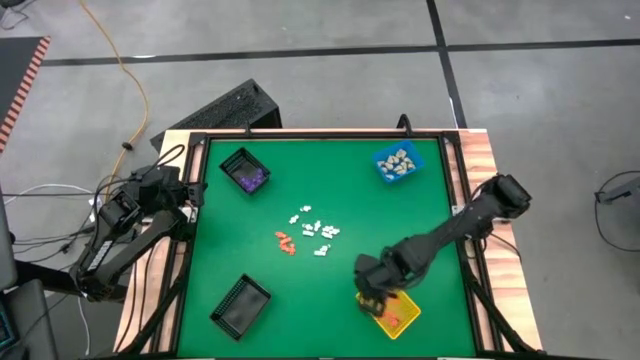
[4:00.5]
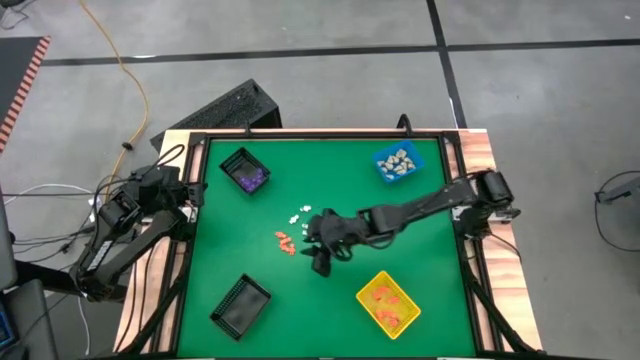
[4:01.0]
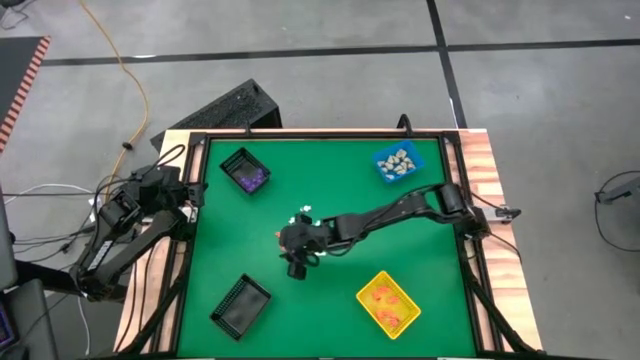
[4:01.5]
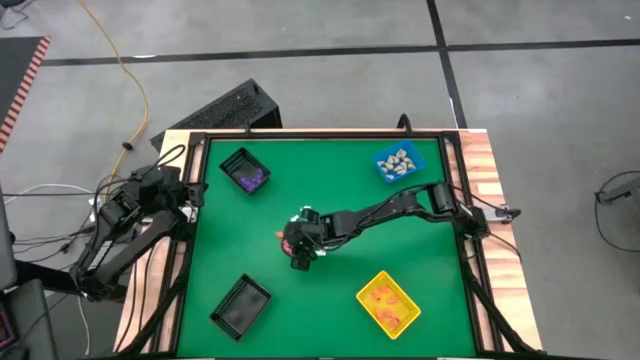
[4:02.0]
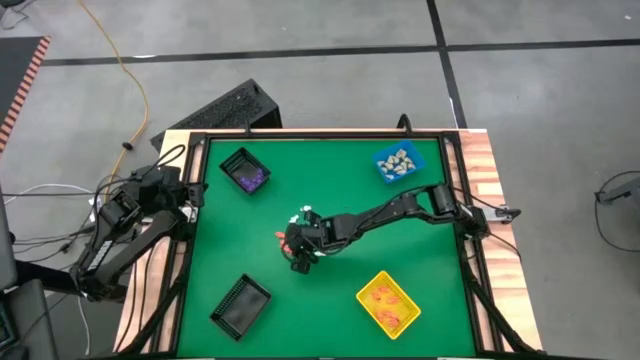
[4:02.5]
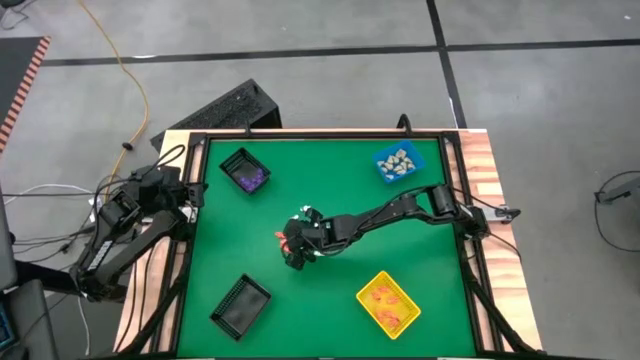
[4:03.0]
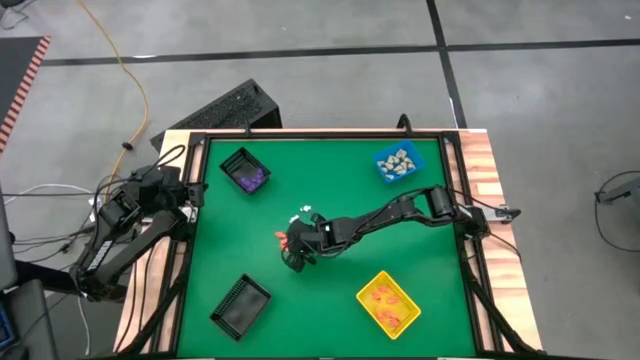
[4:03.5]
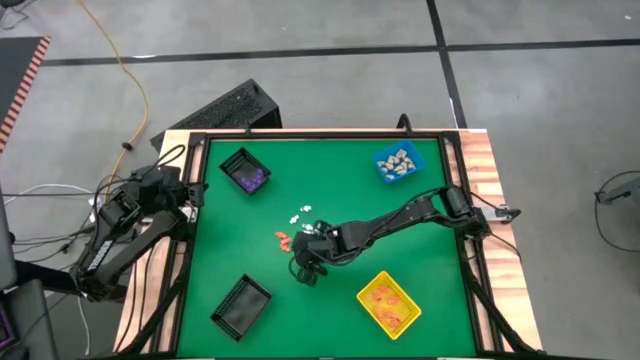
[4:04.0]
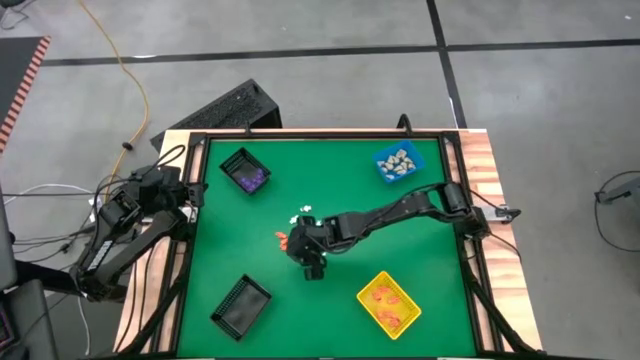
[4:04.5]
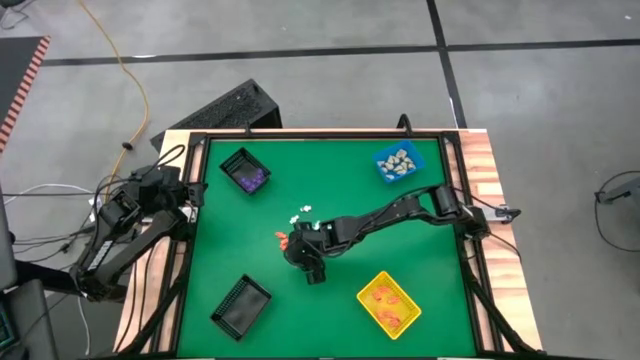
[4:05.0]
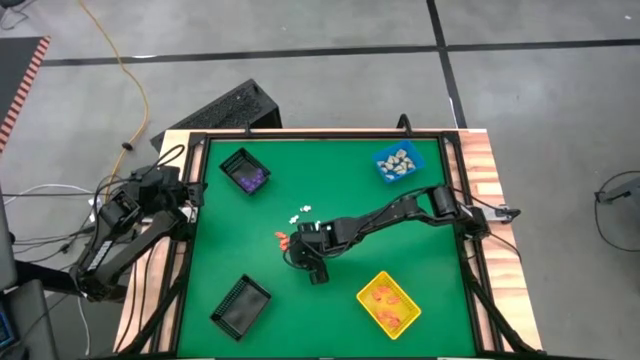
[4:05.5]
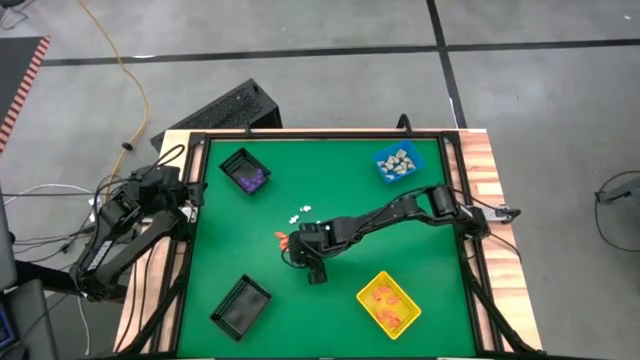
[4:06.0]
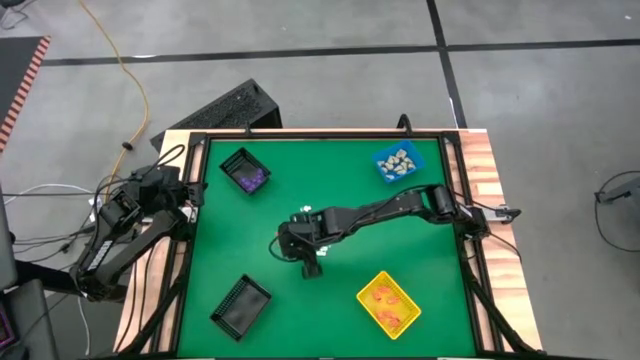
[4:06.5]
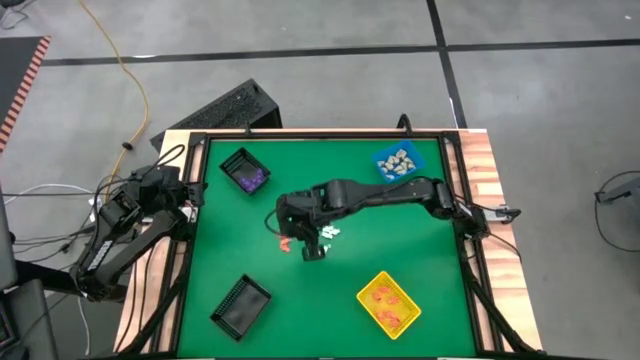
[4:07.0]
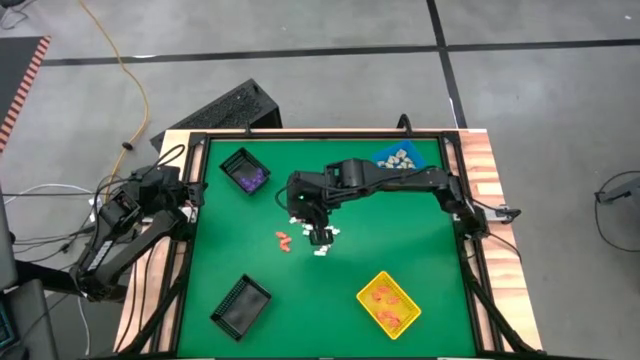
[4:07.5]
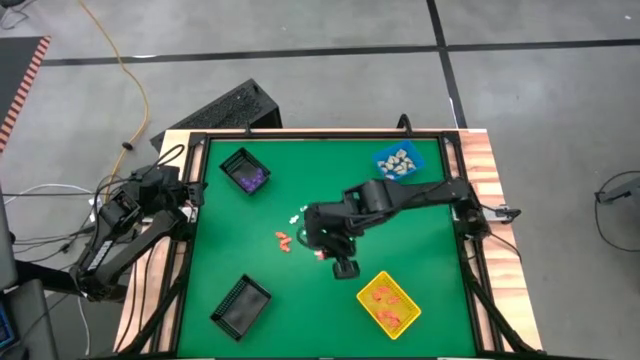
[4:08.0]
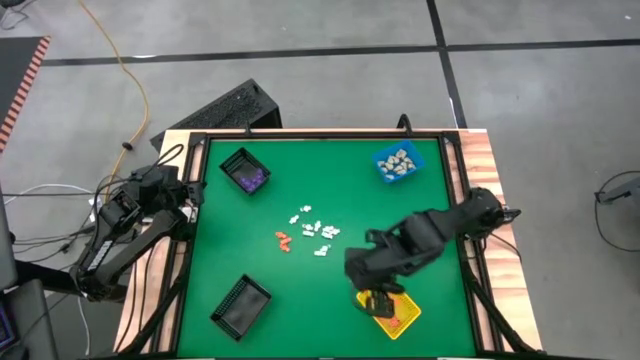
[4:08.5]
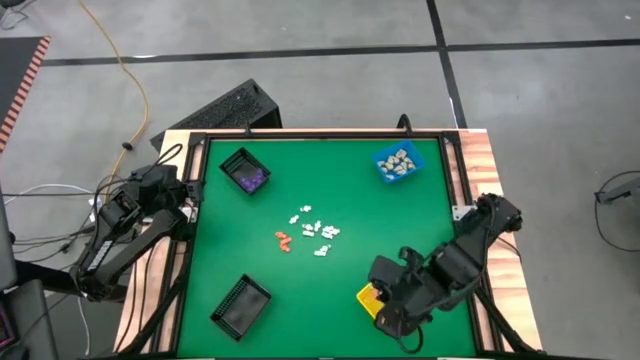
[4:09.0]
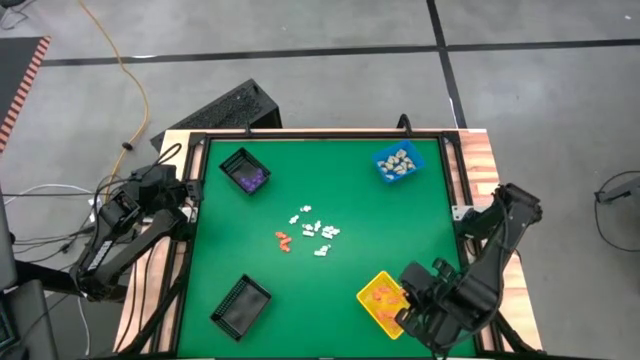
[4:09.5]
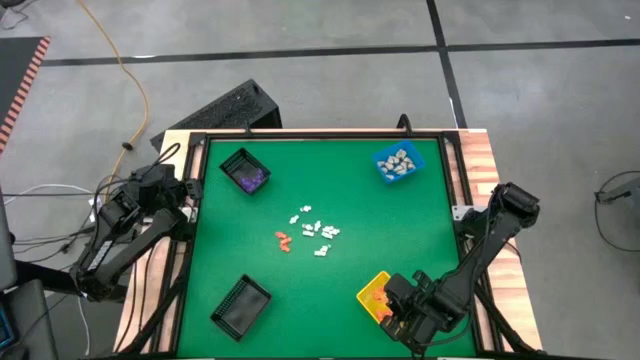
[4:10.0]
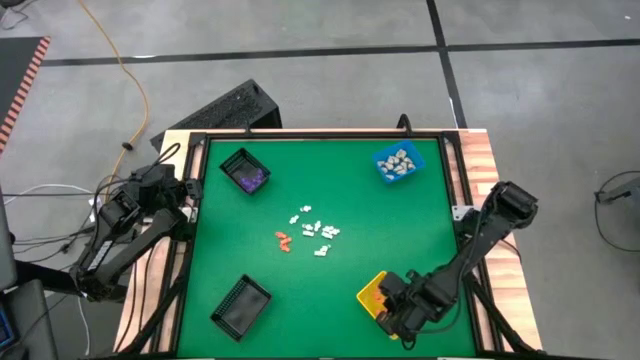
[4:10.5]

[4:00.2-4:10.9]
Task: Sort Halloween decoration
Put the orange skeleton toy into the yellow basket

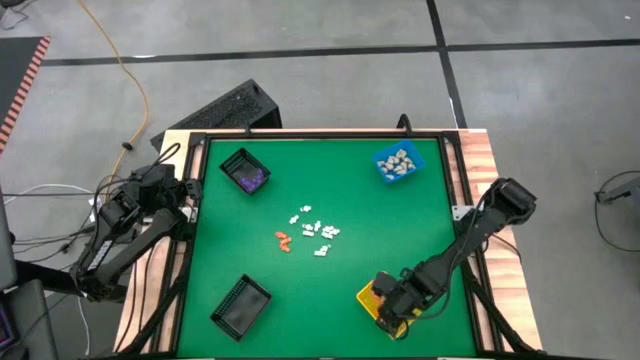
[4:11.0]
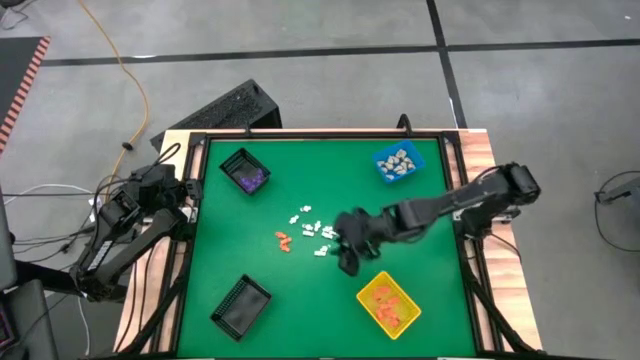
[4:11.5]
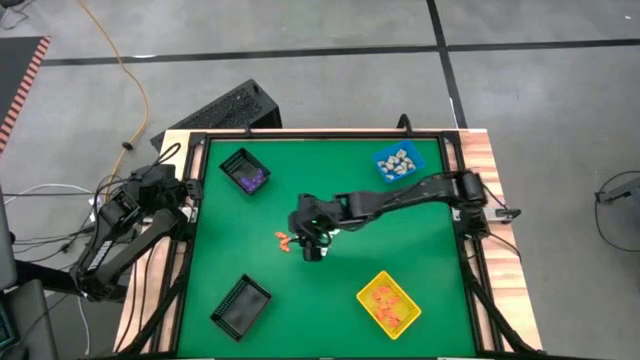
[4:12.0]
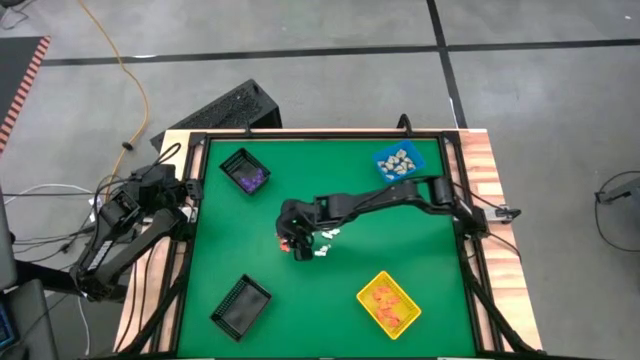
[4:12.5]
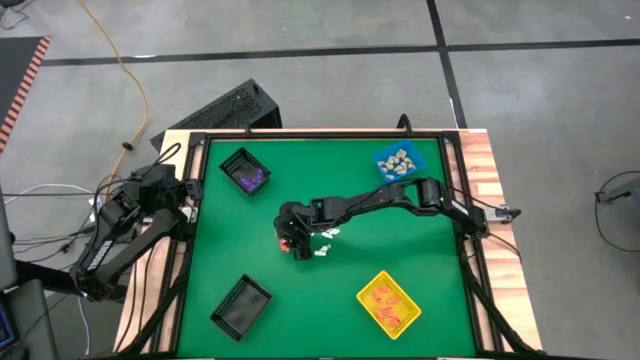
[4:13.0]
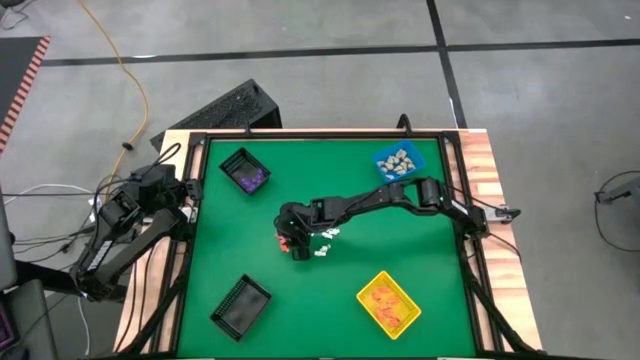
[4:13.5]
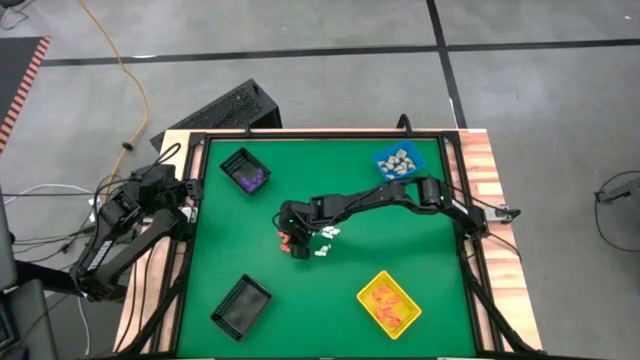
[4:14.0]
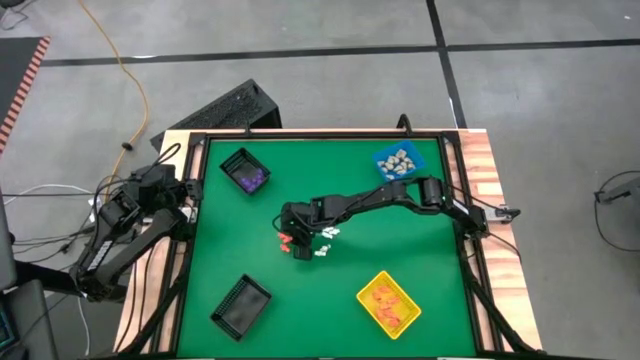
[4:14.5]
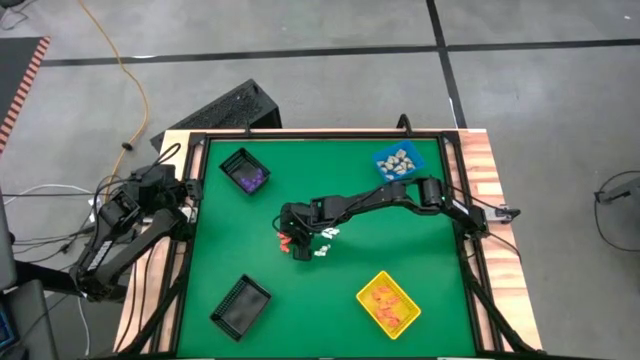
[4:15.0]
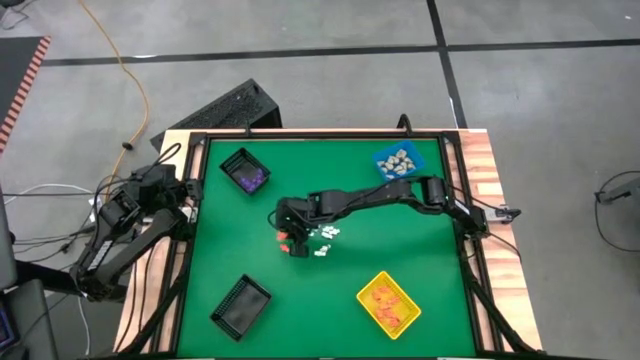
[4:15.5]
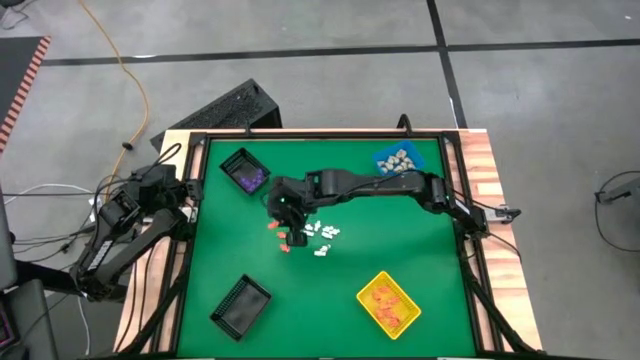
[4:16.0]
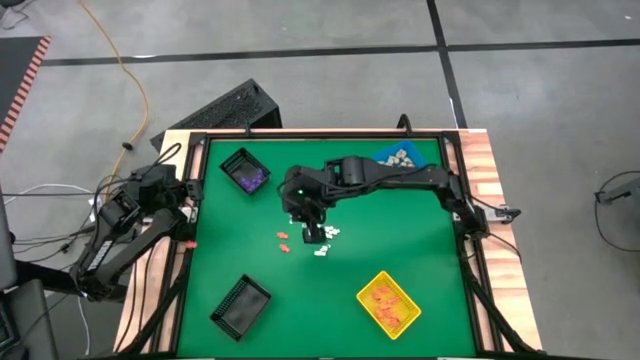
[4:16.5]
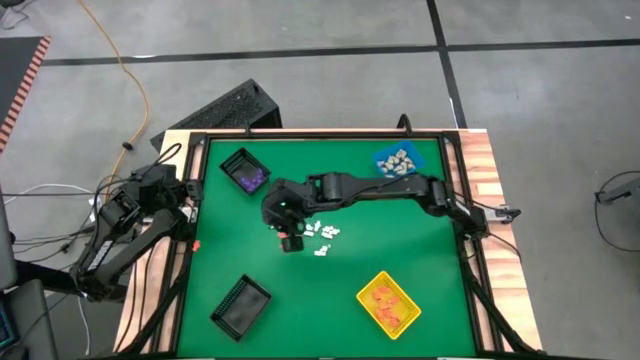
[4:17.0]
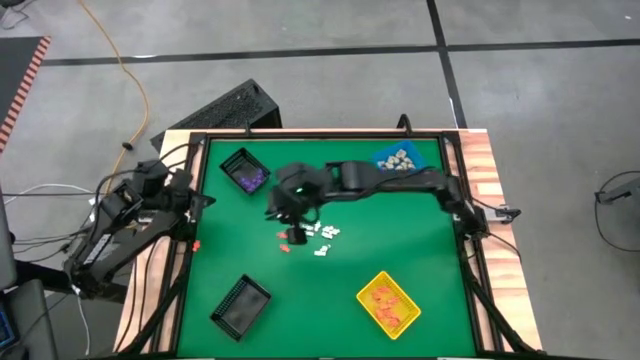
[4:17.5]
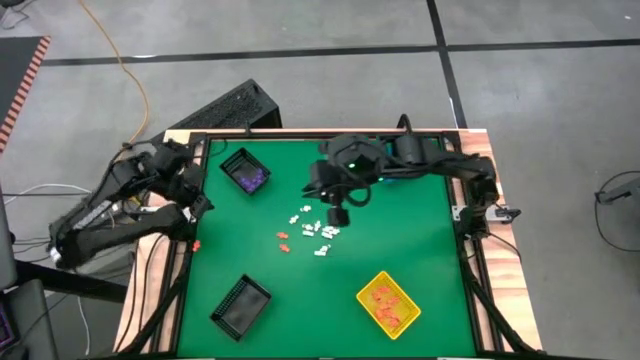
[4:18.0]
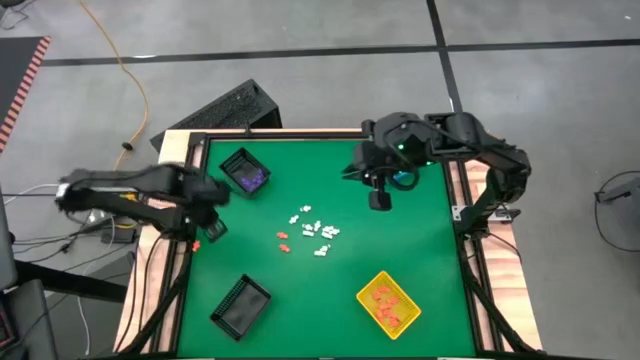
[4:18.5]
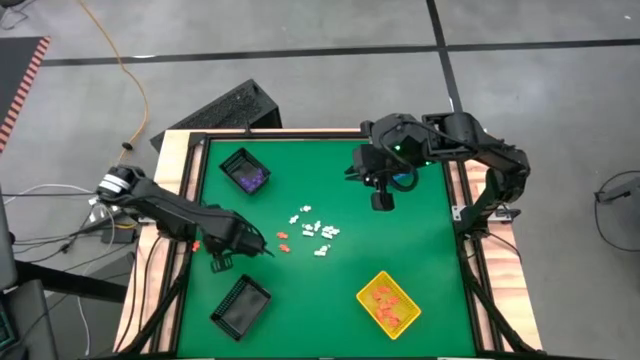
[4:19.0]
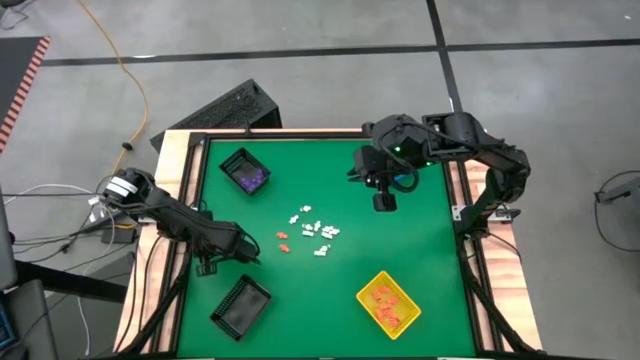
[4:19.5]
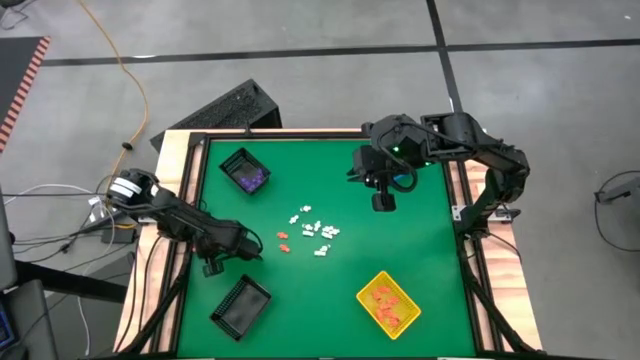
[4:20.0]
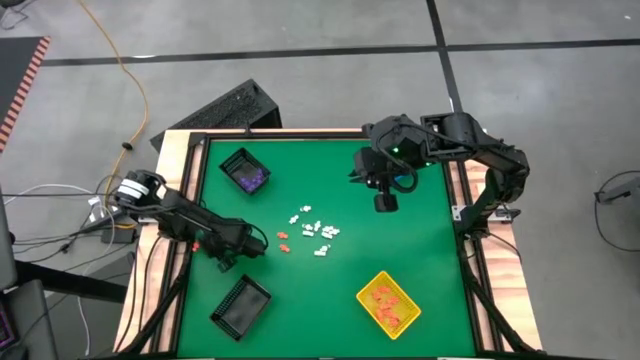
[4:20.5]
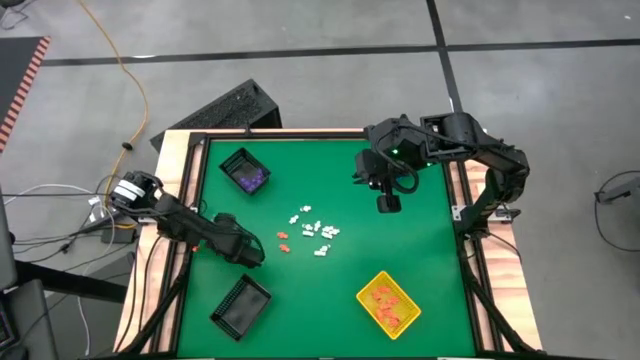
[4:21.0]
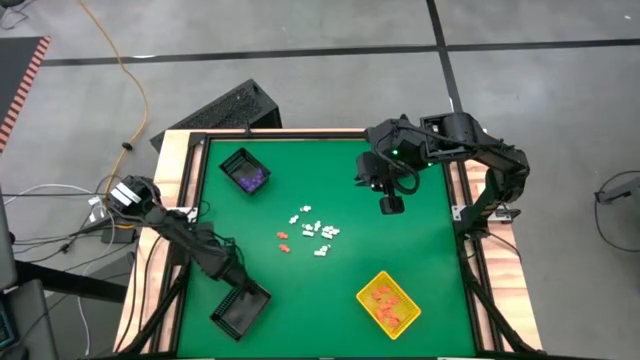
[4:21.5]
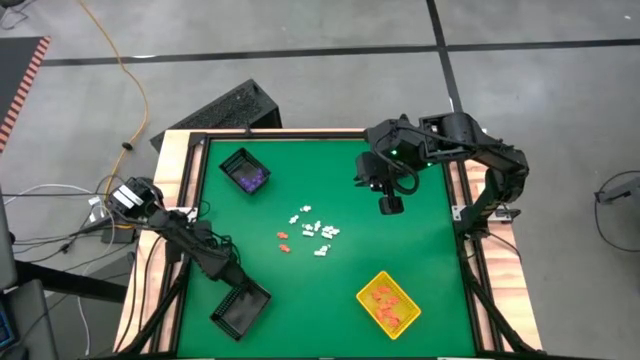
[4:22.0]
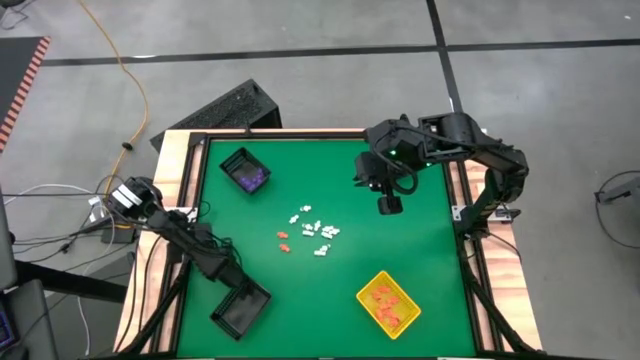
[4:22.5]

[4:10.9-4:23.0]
Put the orange skeleton toy into the yellow basket
